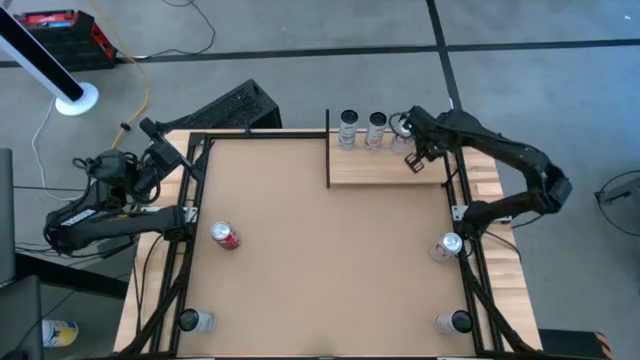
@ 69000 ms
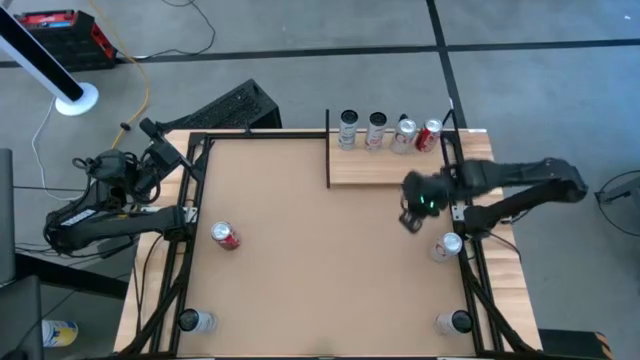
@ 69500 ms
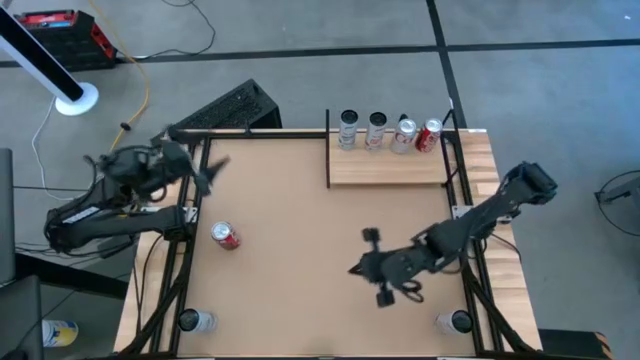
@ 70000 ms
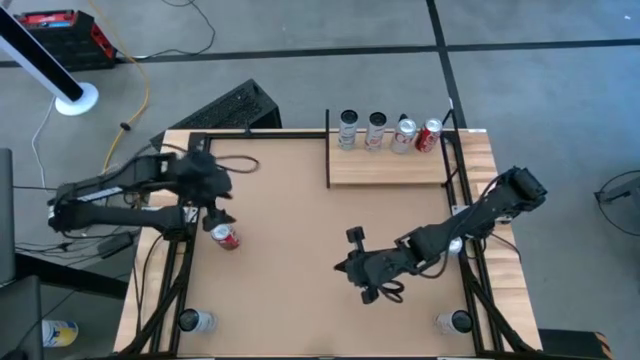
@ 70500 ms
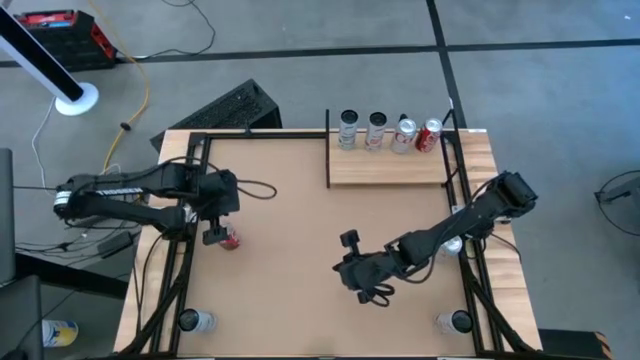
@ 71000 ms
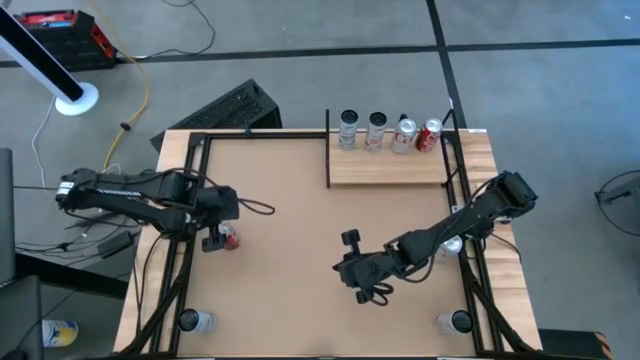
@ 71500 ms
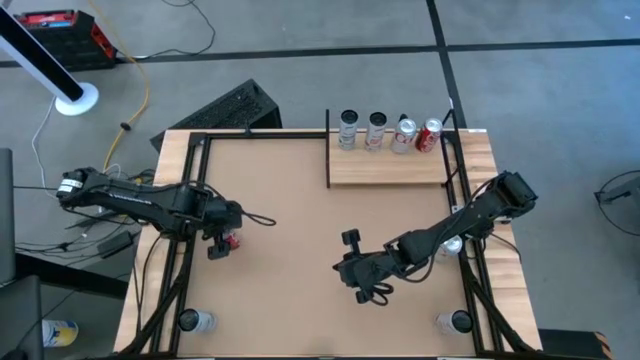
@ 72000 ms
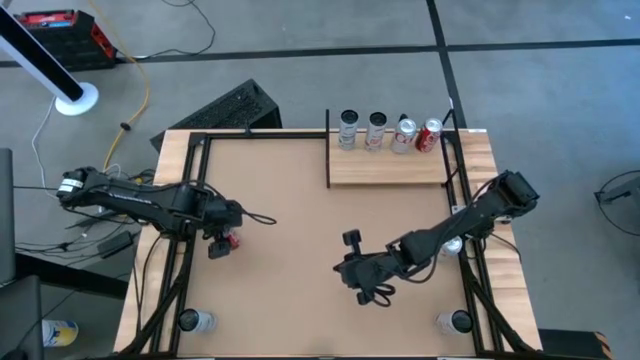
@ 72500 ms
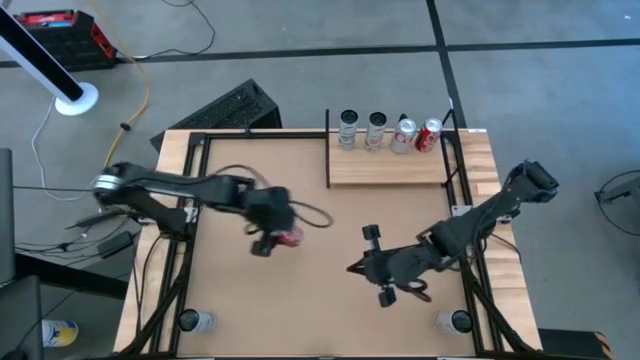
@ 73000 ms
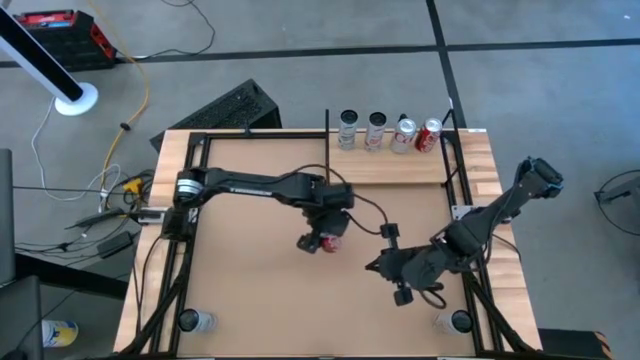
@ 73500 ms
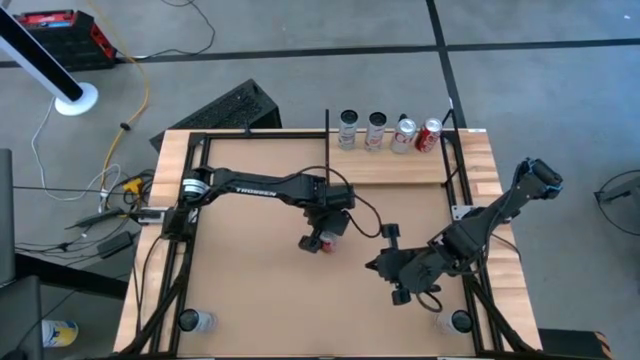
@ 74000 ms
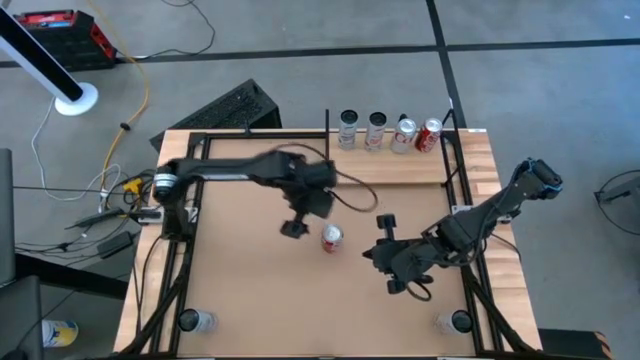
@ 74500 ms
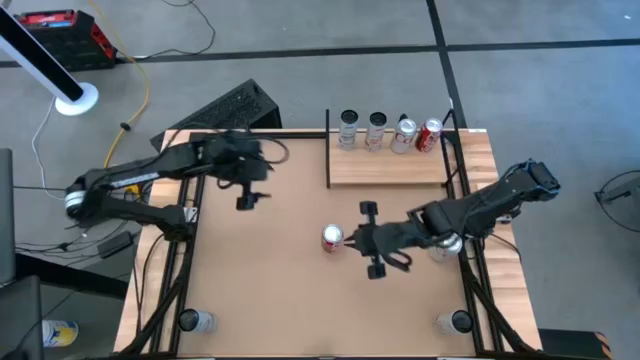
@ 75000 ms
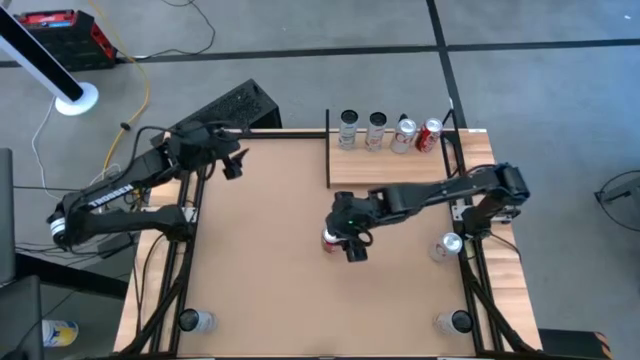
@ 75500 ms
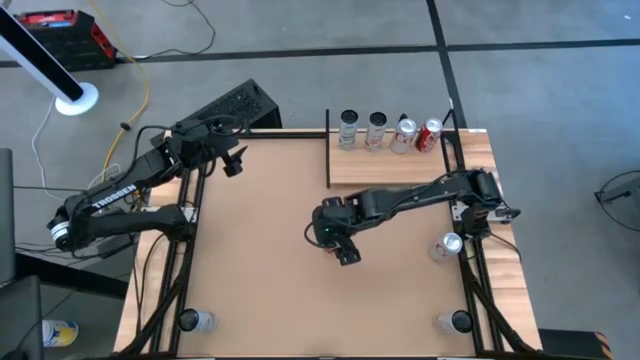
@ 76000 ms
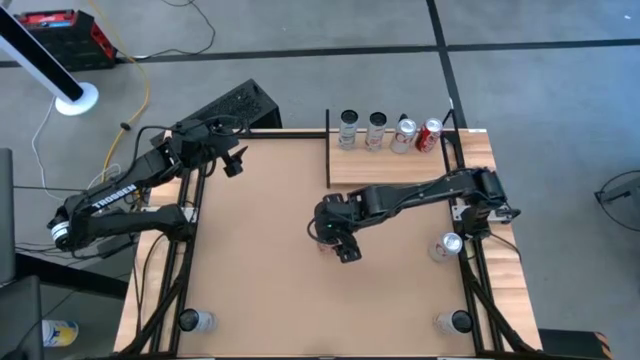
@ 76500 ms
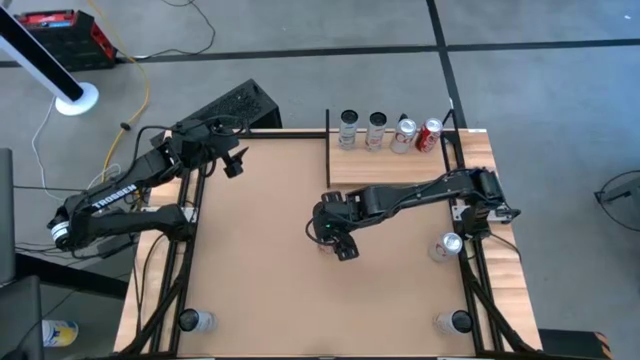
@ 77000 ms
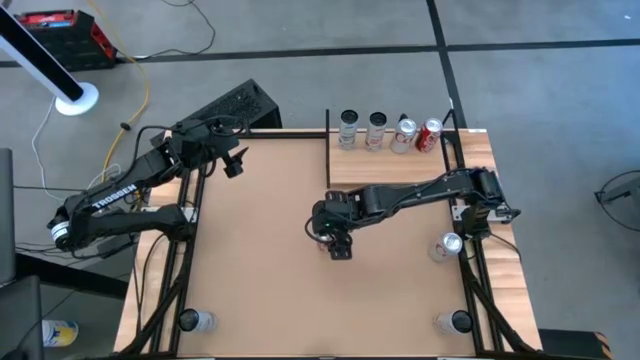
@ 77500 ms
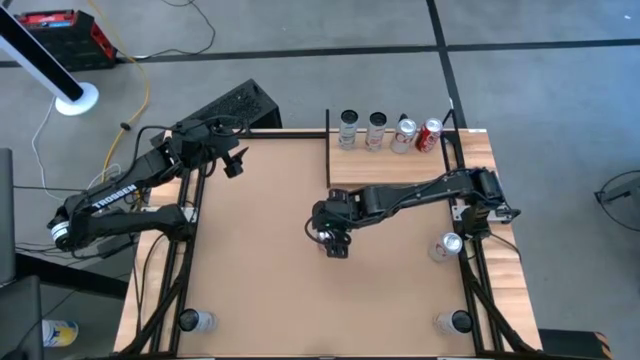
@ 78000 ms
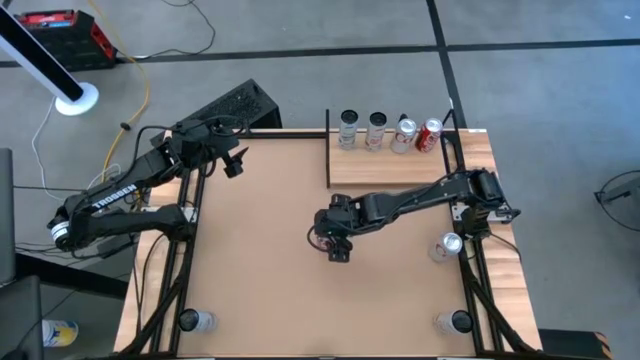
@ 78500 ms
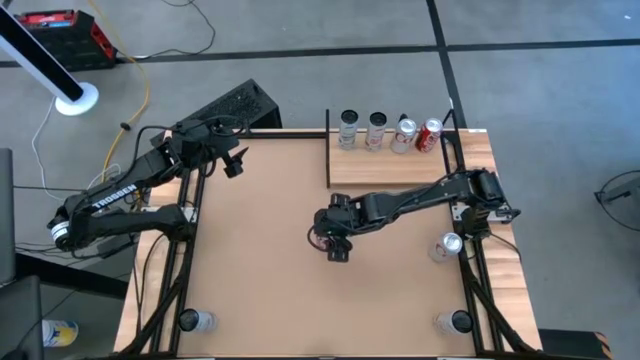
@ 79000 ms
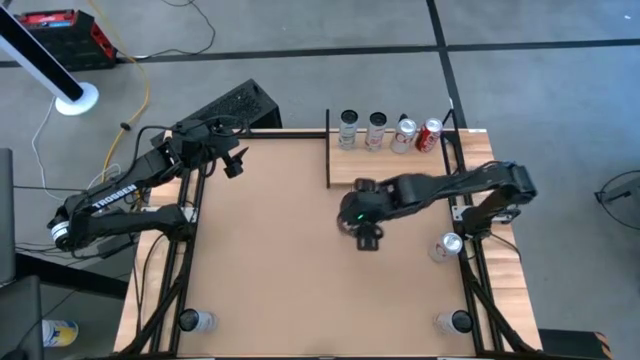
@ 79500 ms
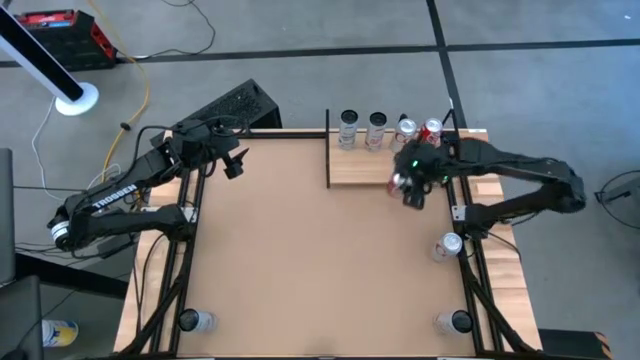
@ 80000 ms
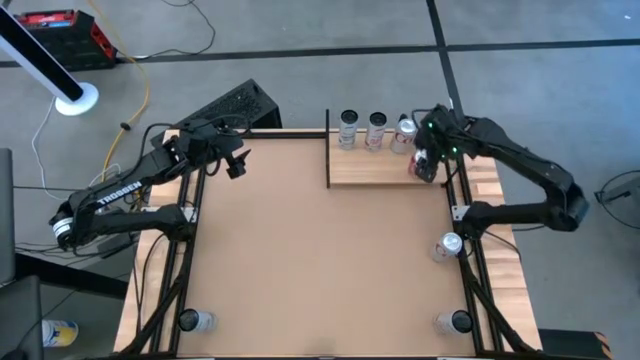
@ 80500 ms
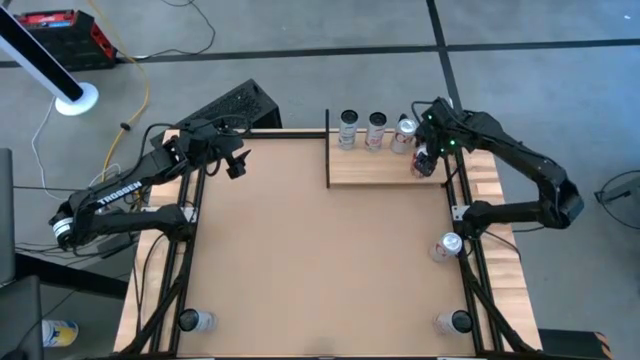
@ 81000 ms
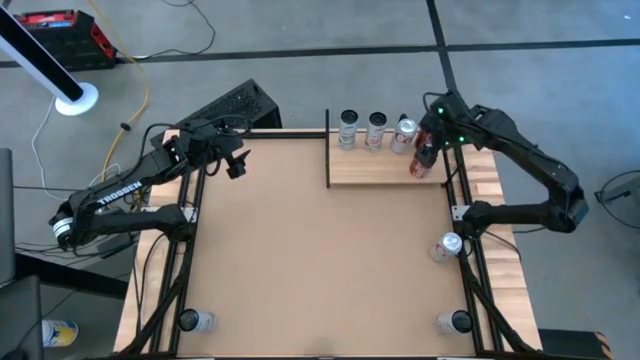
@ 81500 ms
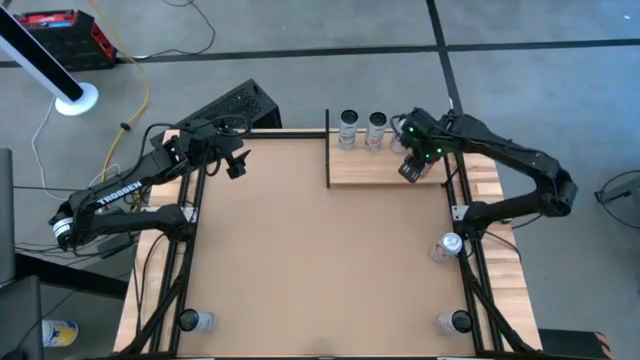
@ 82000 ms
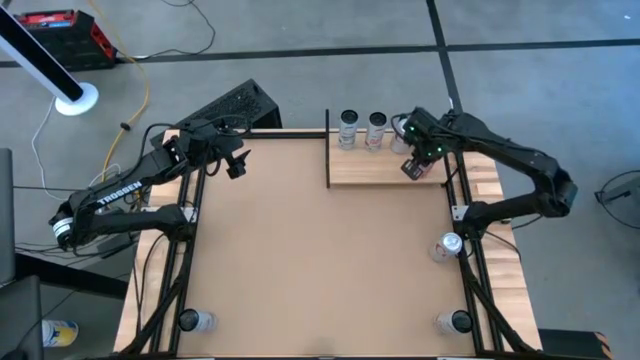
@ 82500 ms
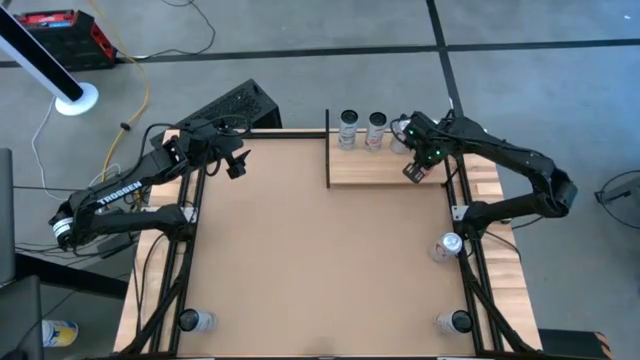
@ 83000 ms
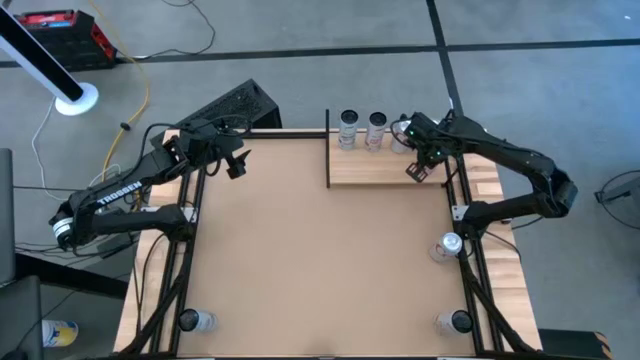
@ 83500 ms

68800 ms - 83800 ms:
Task: Place canned beverage on shelf
Put the red and white soda can on the shelf and align it with the other red and white soda can

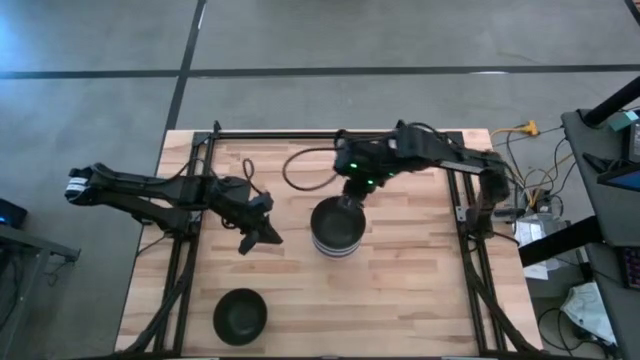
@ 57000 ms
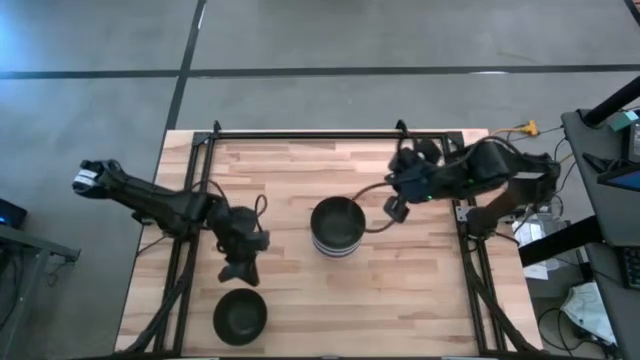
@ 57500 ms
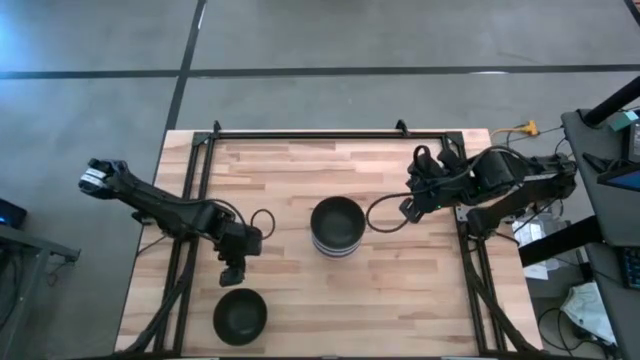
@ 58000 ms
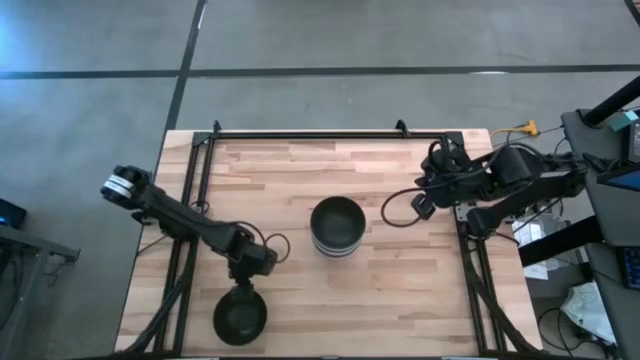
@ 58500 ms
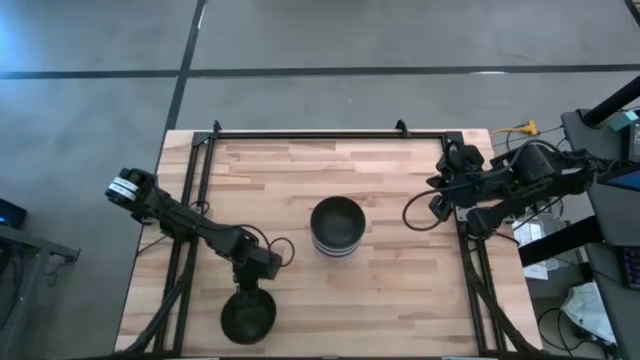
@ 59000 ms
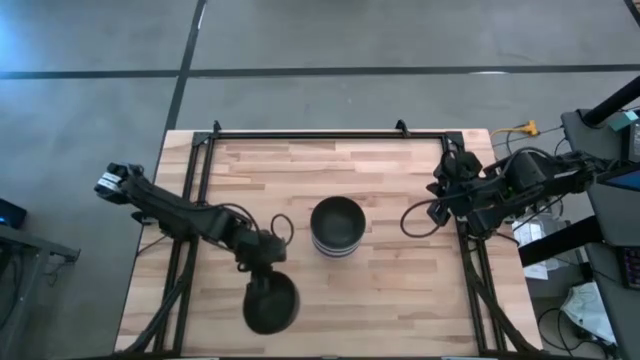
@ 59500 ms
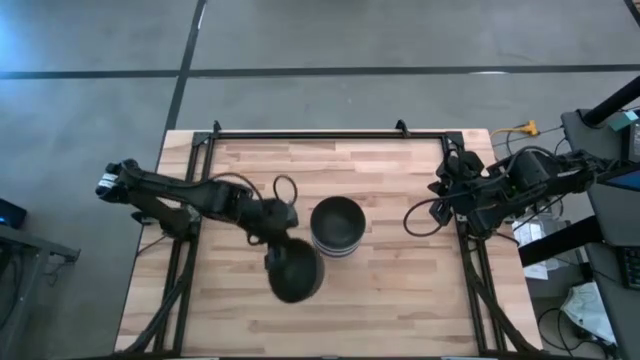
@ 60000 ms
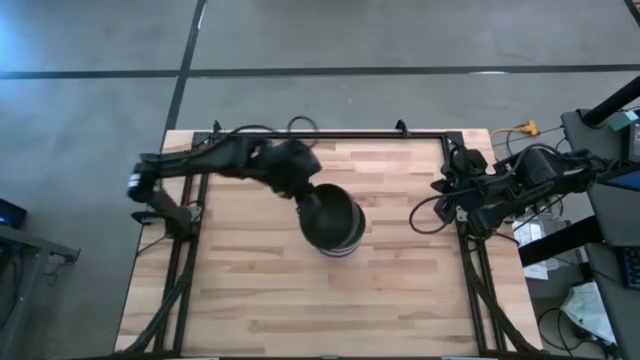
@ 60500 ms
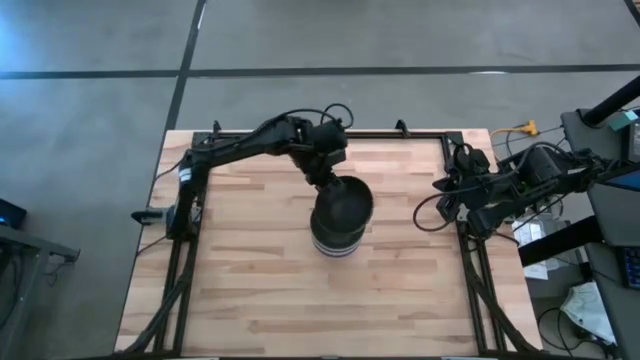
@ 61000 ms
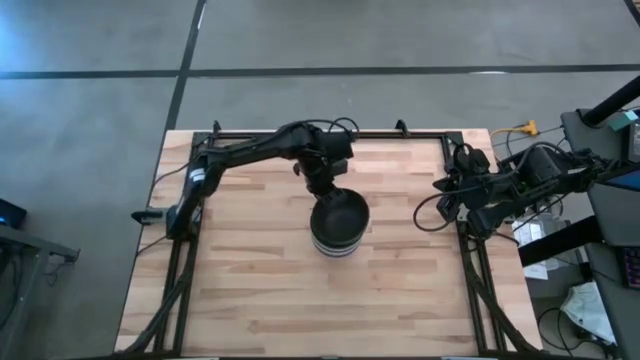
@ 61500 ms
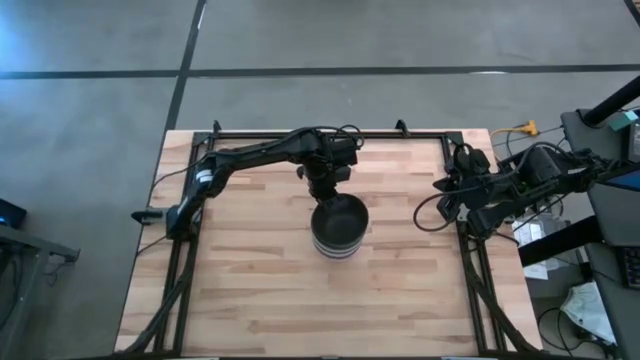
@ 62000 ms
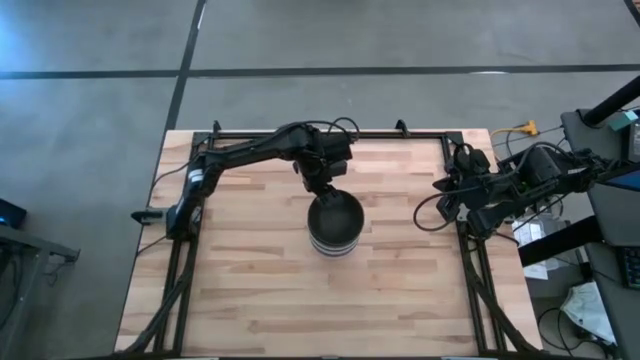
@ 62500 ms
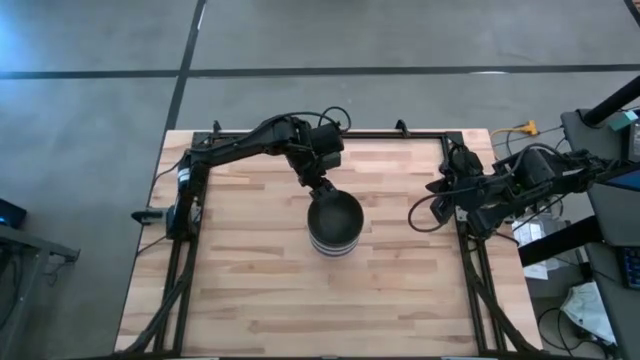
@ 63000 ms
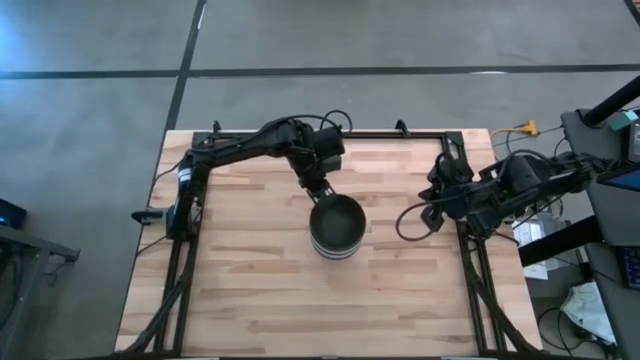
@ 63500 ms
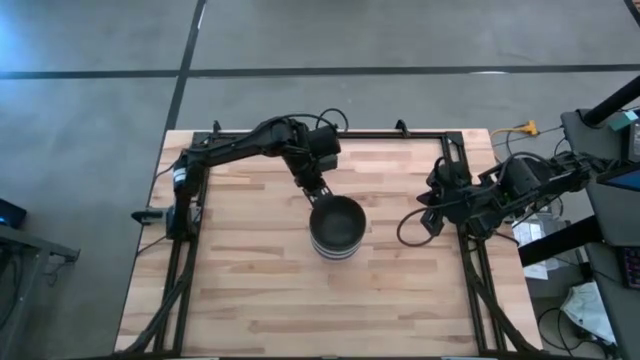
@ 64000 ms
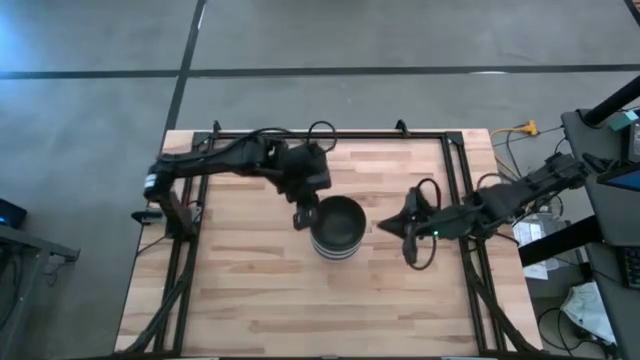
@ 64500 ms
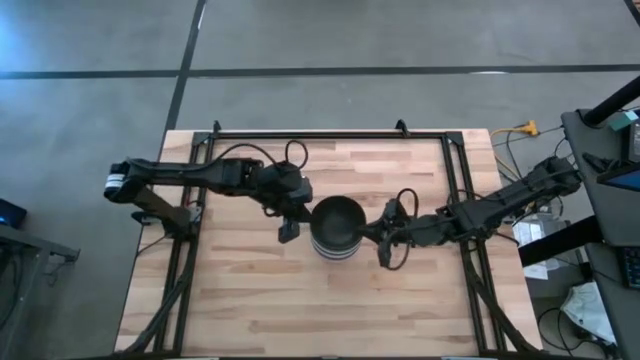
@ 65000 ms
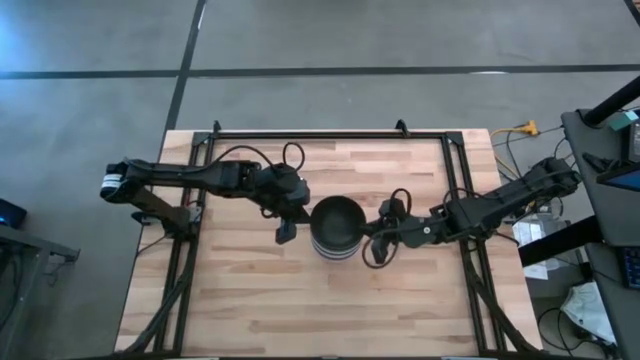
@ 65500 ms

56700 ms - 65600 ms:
Task: Nest bowls inside each other
Stack the black bowl on the black bowl
